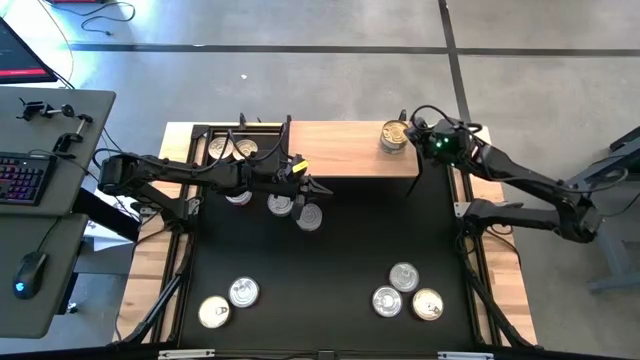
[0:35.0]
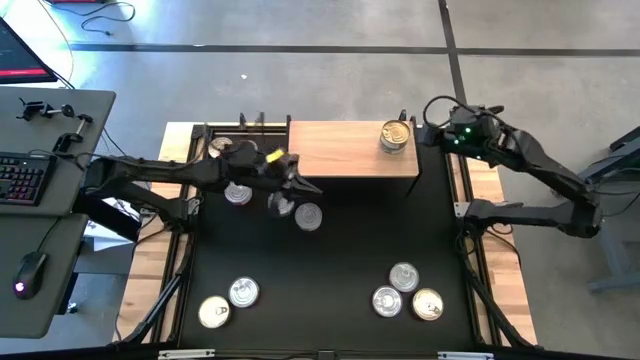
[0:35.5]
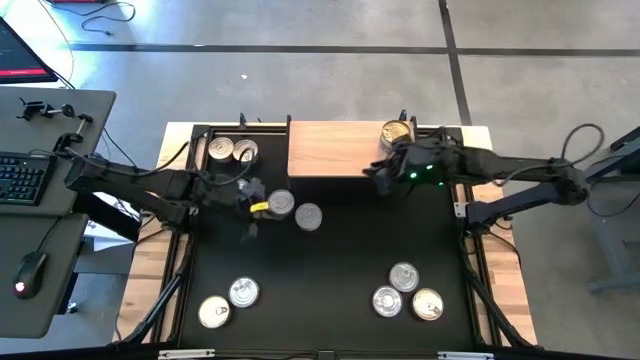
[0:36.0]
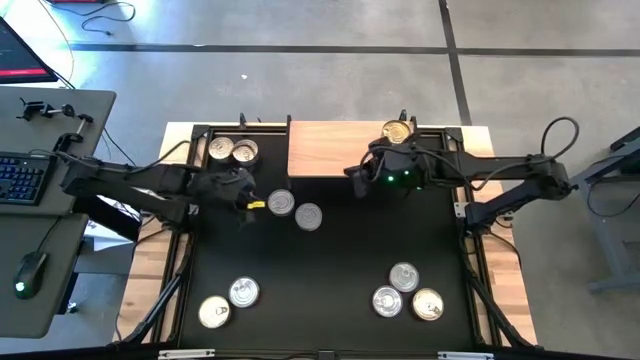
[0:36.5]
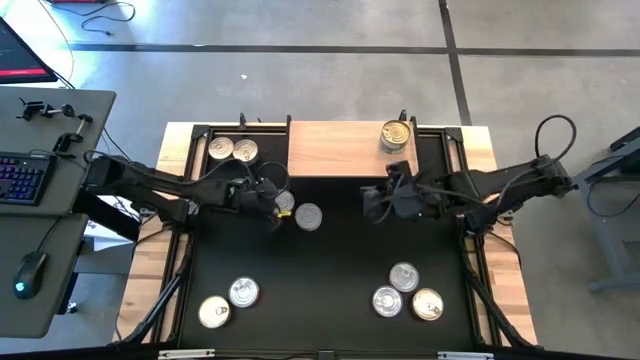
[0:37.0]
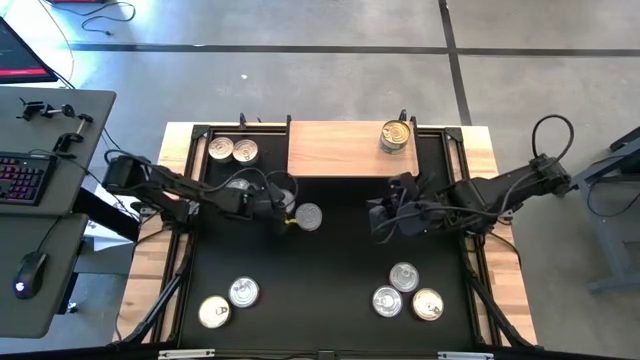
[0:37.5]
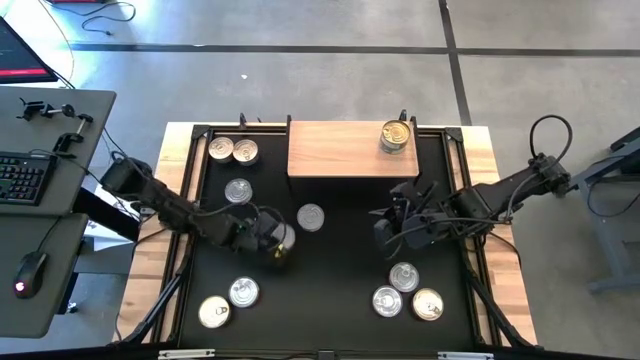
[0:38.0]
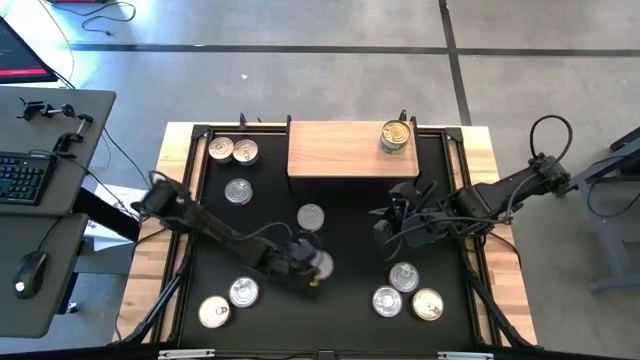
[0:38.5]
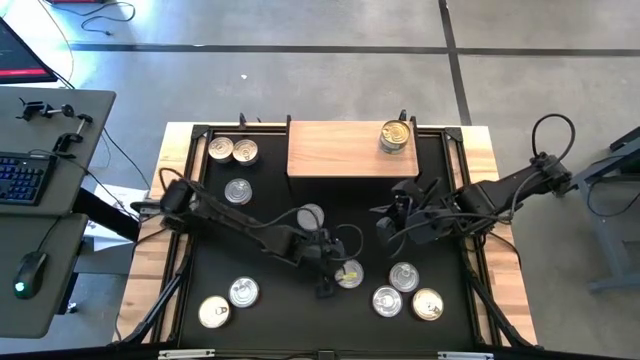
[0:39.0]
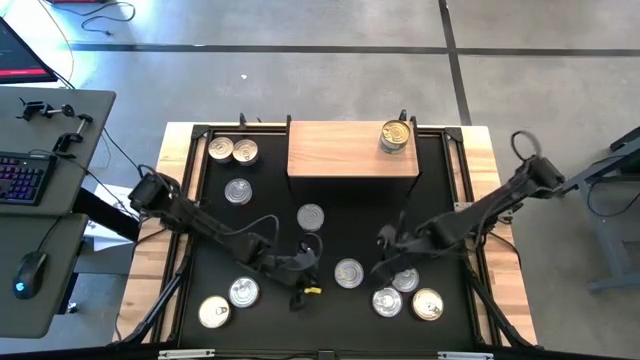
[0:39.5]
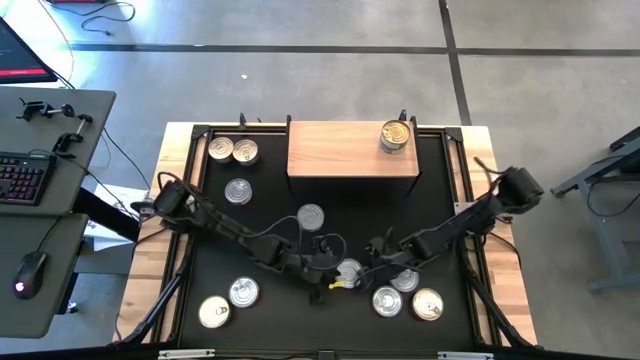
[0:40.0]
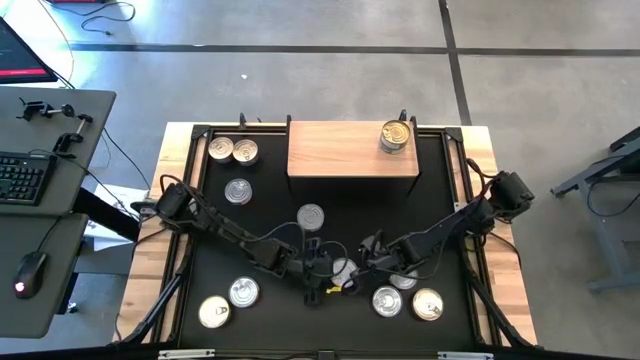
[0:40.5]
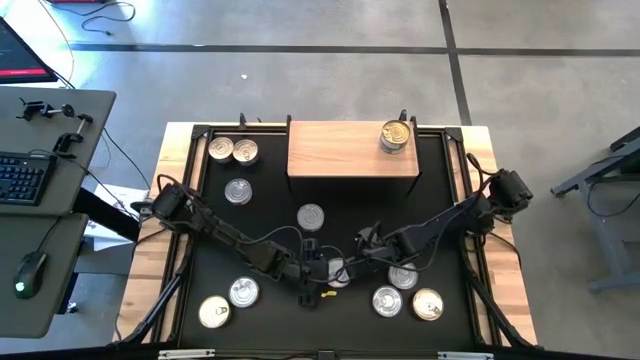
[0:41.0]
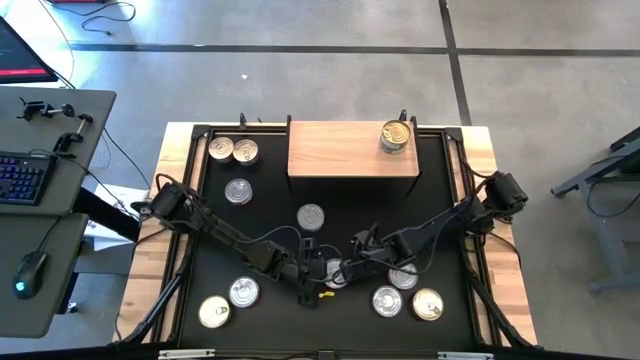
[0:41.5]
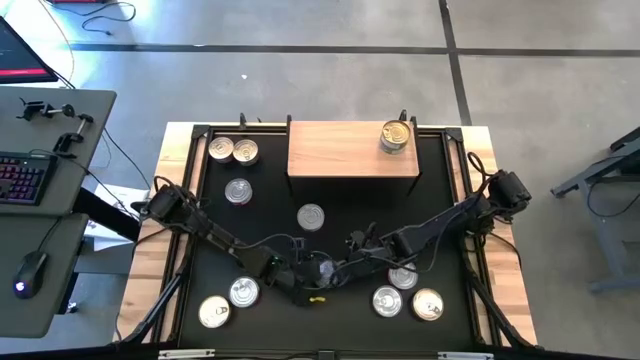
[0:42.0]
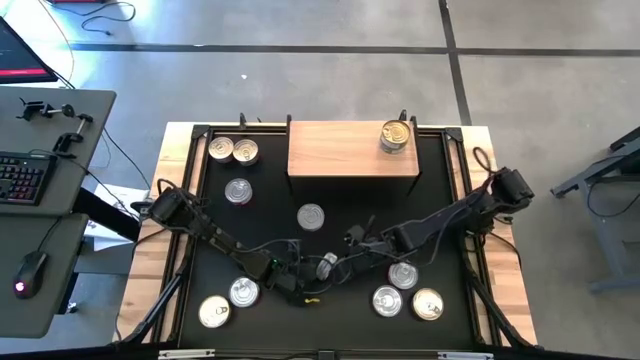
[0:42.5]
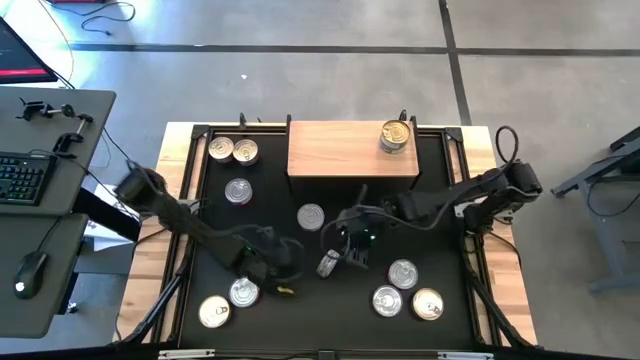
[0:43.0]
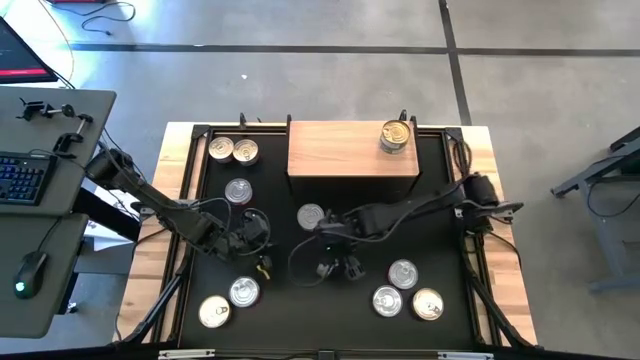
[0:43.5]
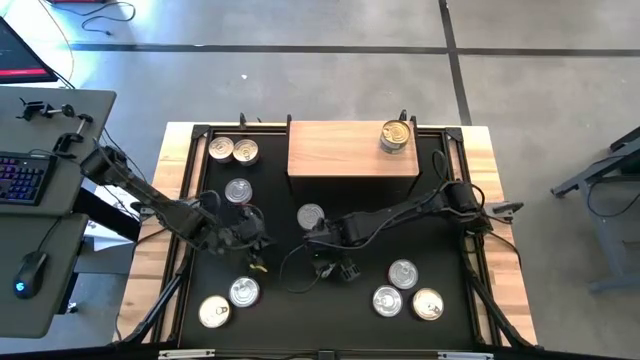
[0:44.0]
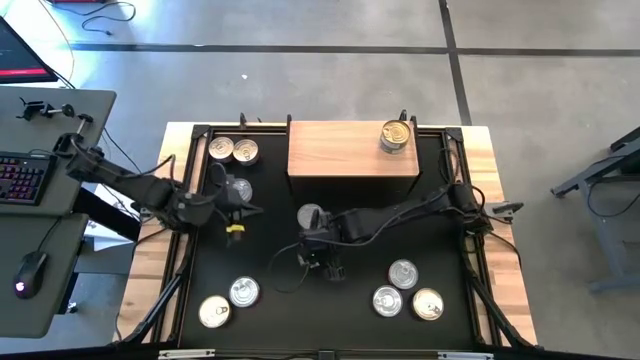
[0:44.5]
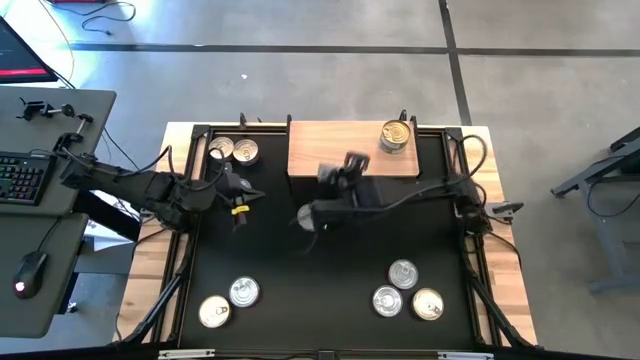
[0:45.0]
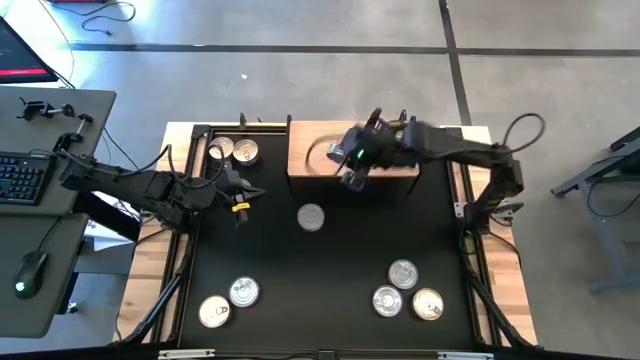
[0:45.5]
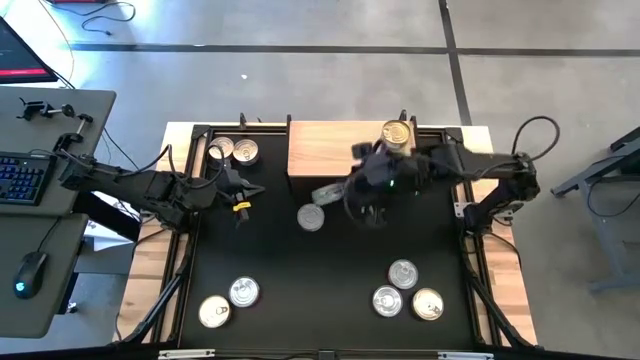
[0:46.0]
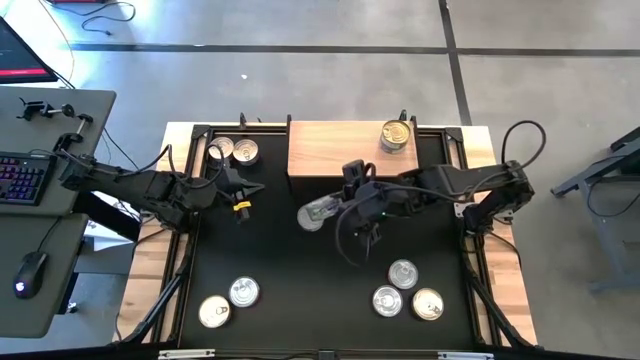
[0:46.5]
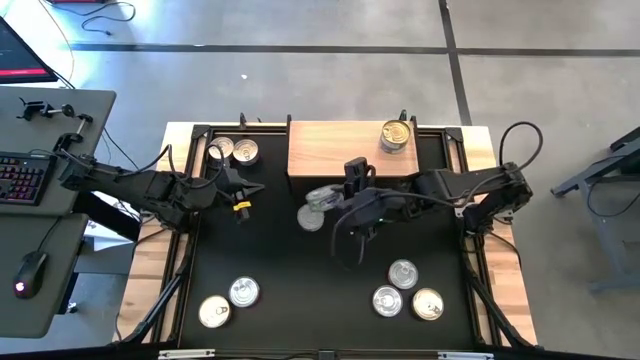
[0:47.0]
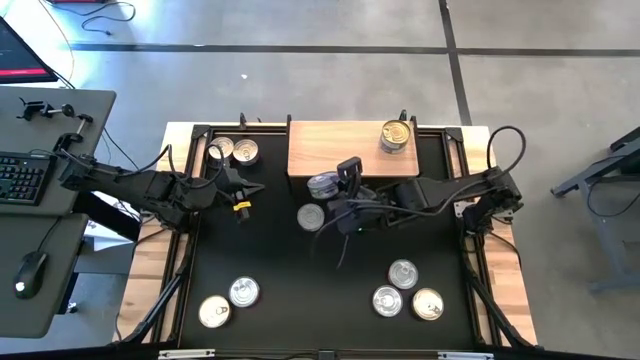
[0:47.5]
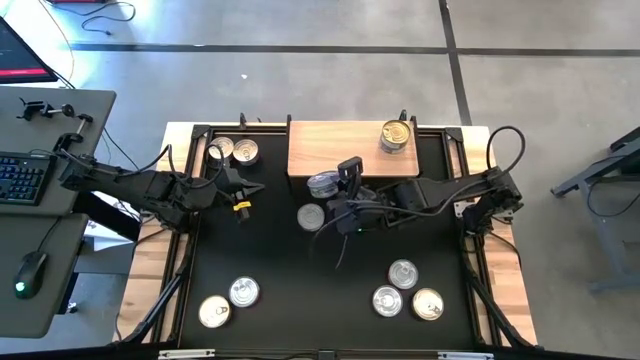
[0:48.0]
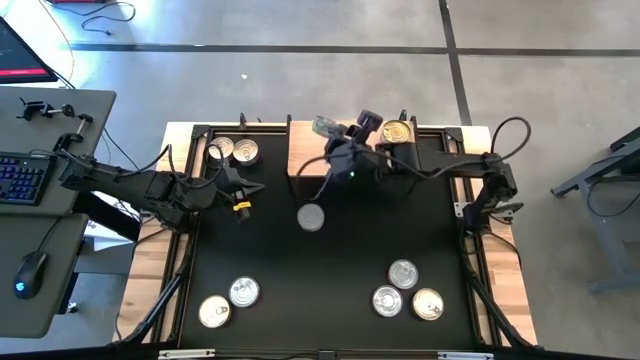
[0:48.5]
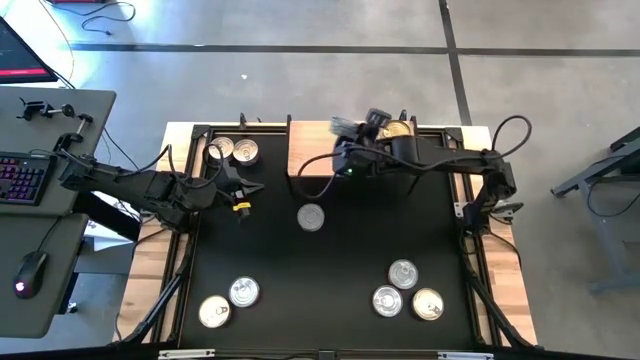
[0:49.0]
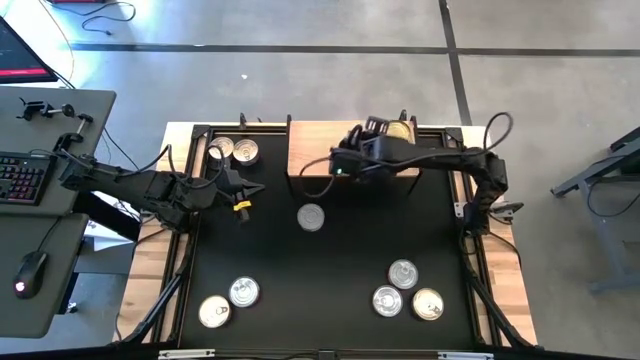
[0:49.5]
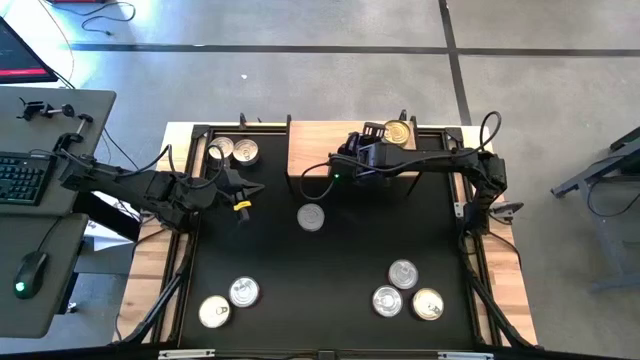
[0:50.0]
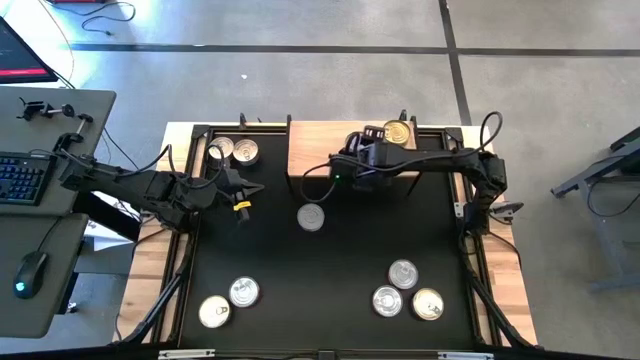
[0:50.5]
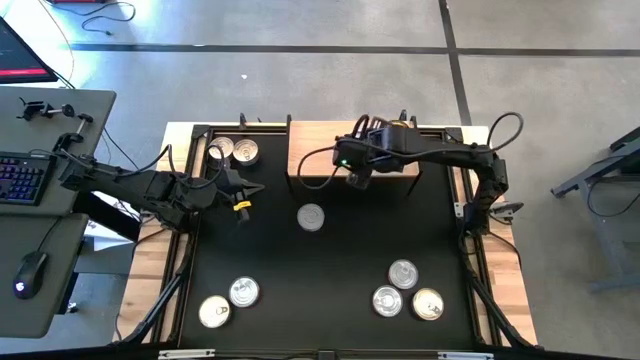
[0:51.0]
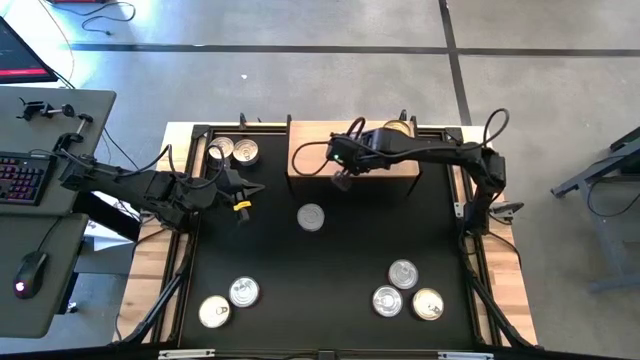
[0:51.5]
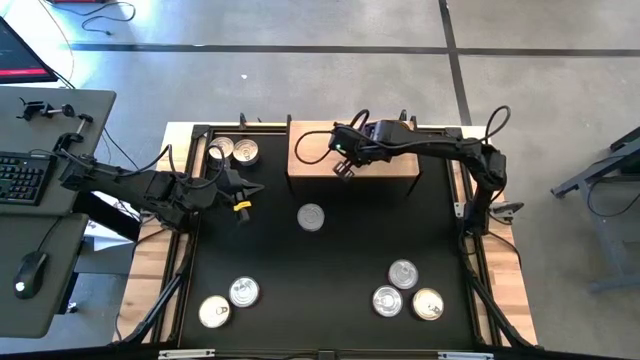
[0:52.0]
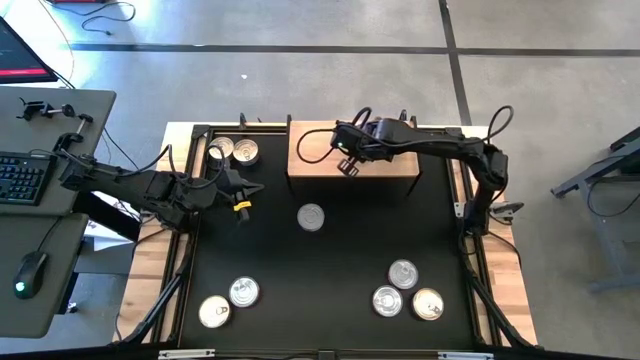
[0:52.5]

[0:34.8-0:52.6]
Task: Stack canned seafood by type on shelf
Put the green tuna can on the shelf

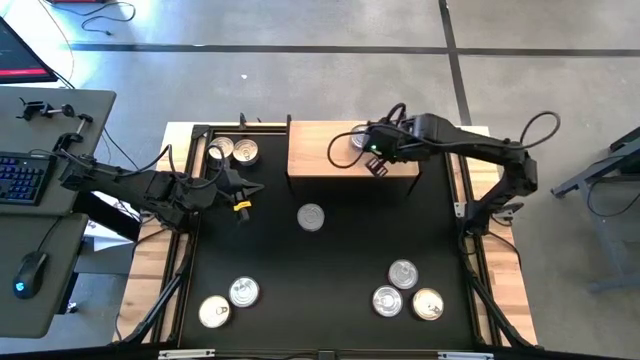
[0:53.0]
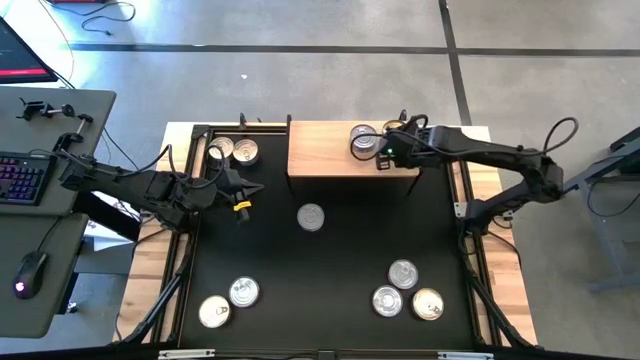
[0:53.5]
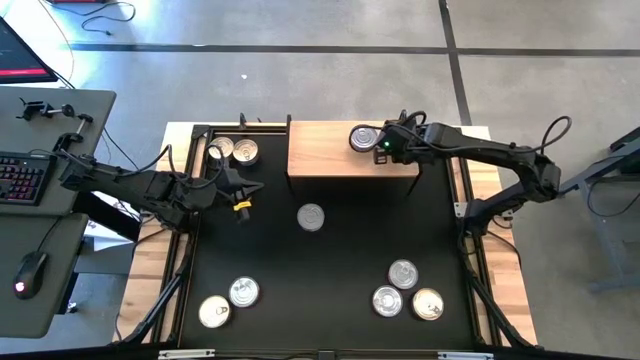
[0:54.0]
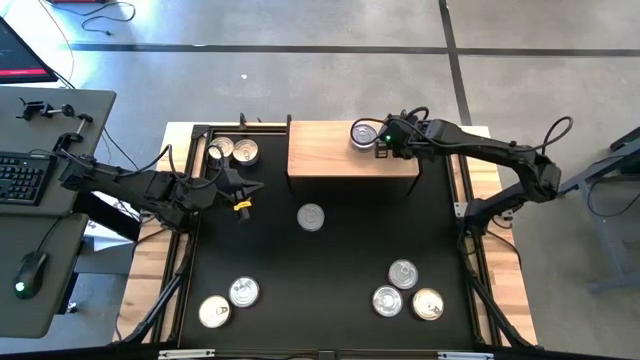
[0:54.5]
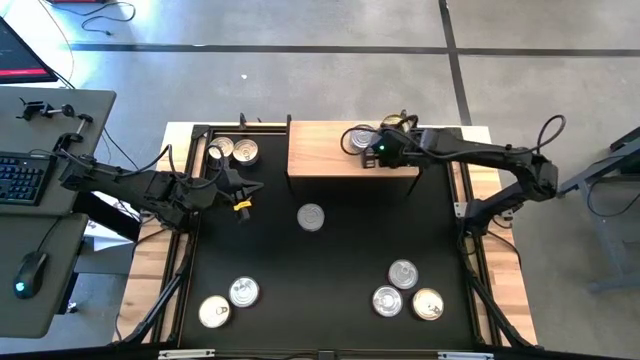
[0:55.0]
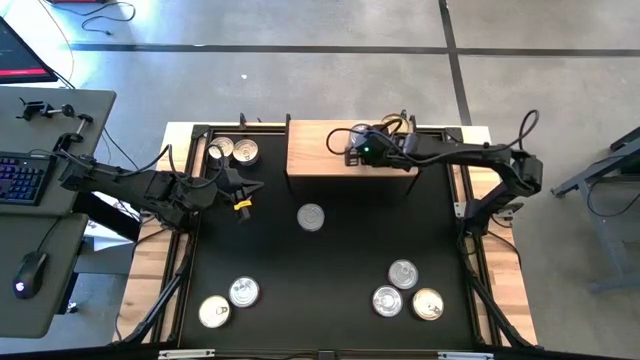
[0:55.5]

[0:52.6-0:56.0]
Adjust the green tuna cans on the shelf
